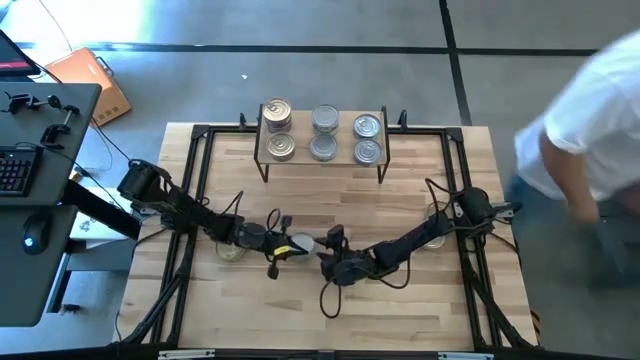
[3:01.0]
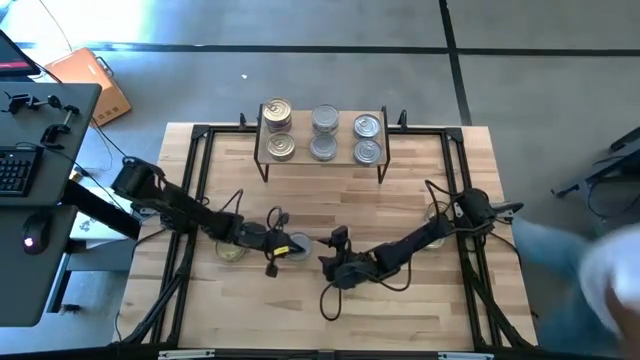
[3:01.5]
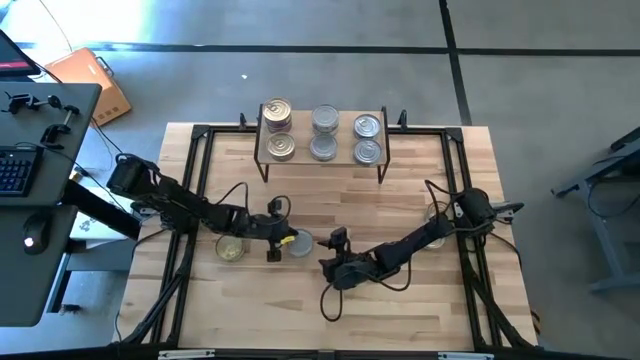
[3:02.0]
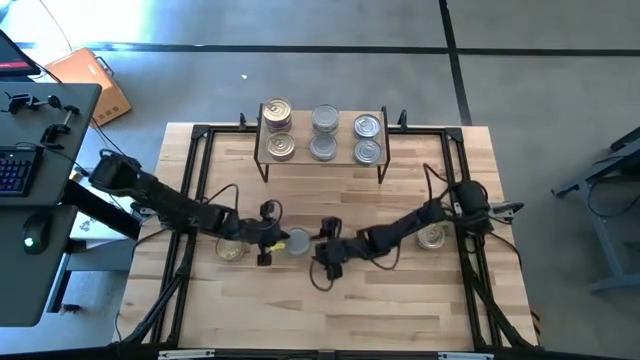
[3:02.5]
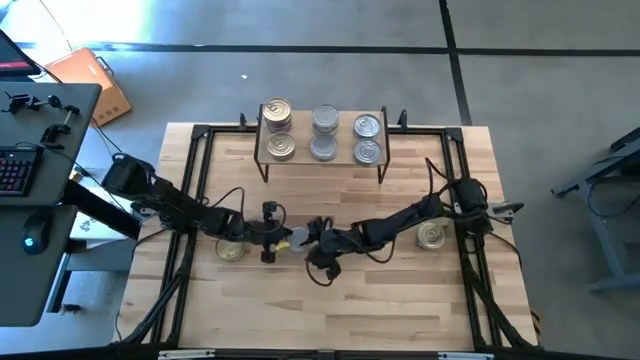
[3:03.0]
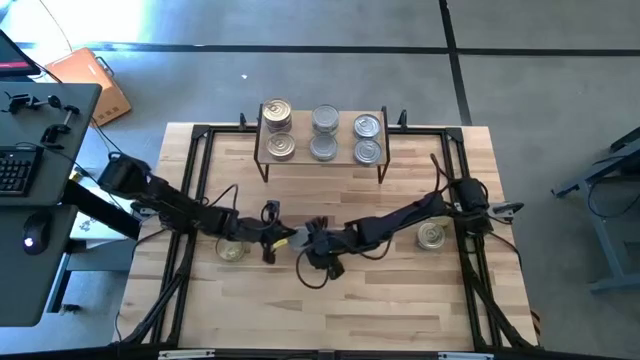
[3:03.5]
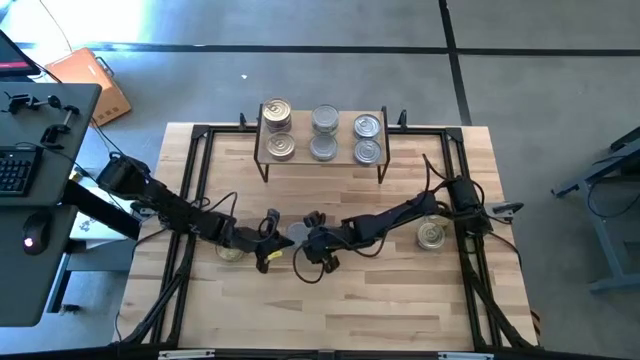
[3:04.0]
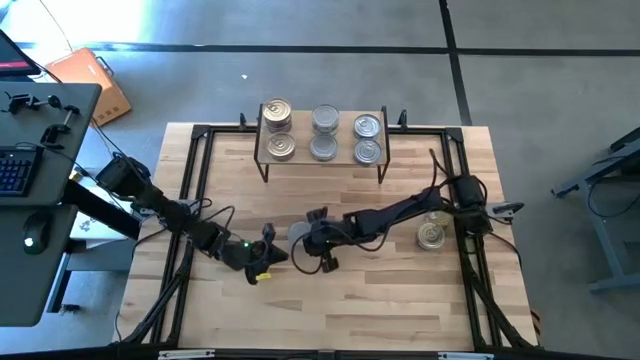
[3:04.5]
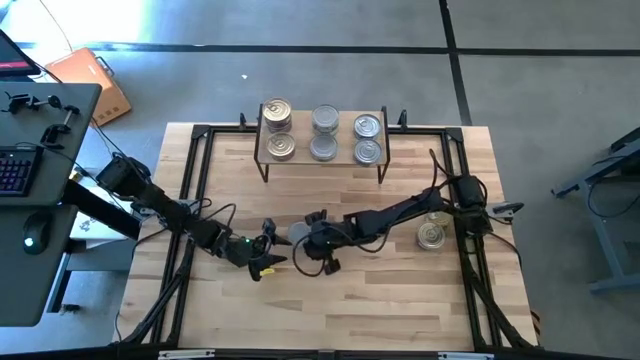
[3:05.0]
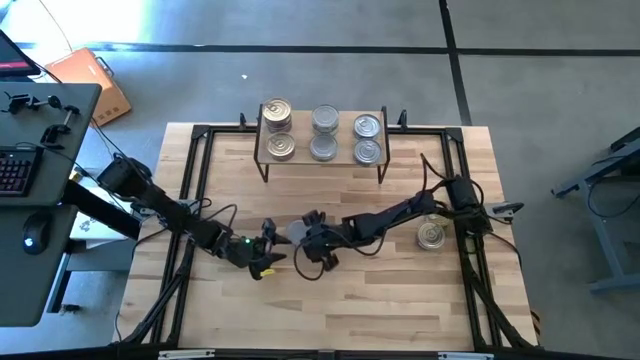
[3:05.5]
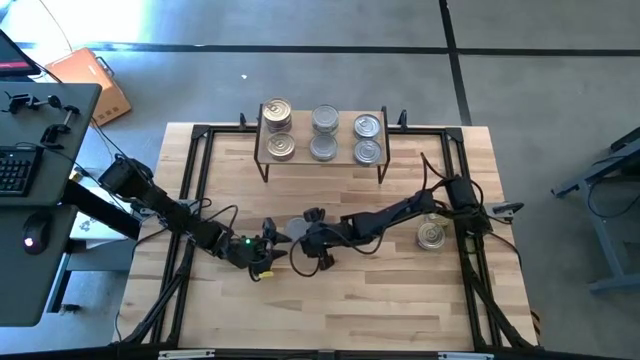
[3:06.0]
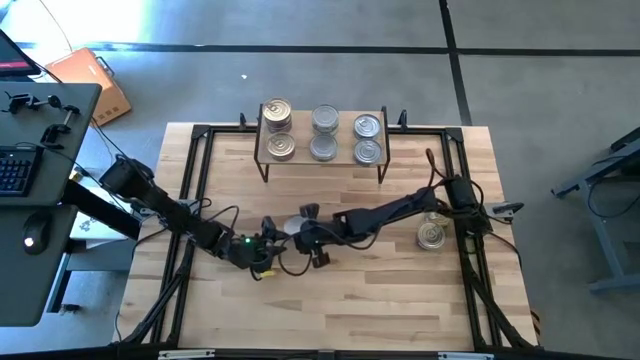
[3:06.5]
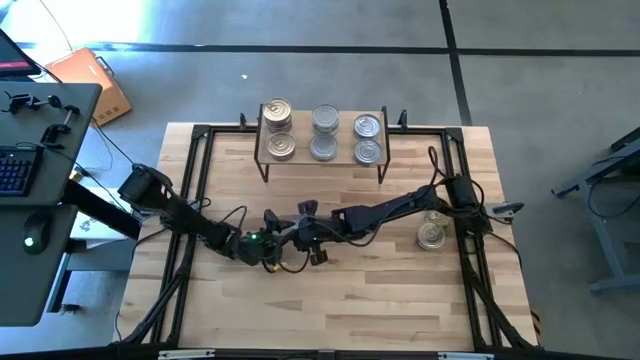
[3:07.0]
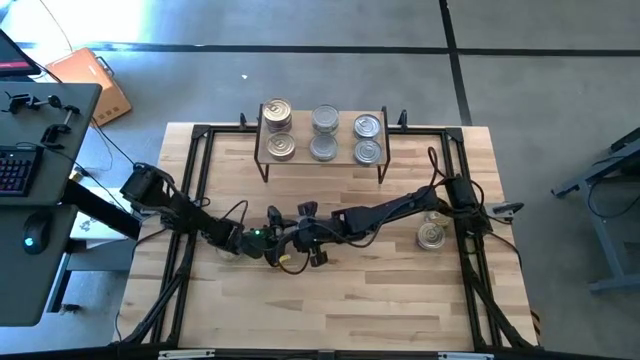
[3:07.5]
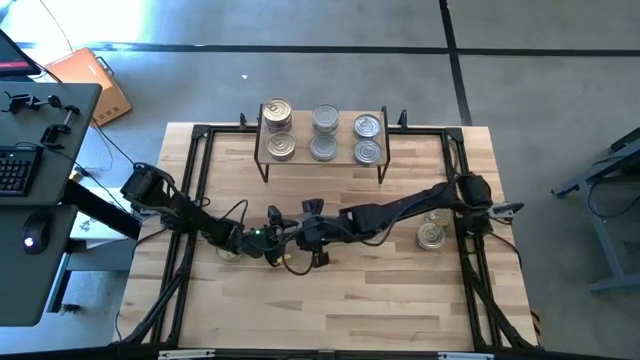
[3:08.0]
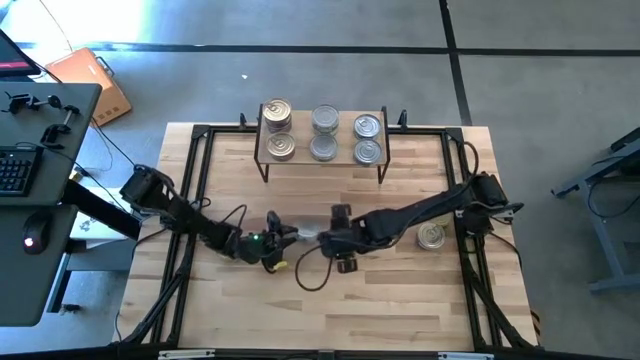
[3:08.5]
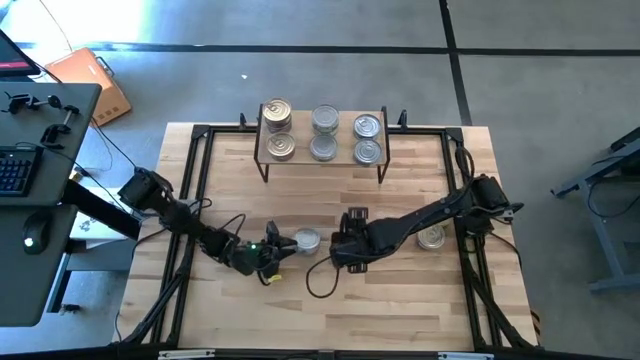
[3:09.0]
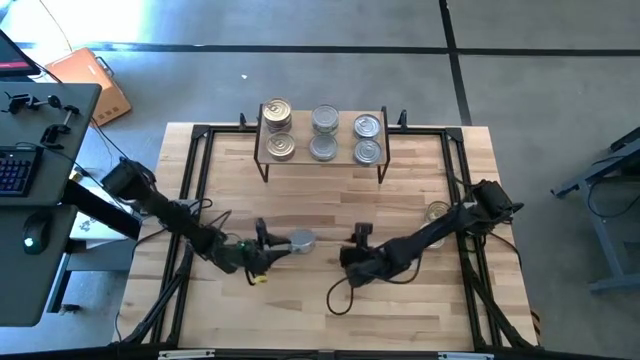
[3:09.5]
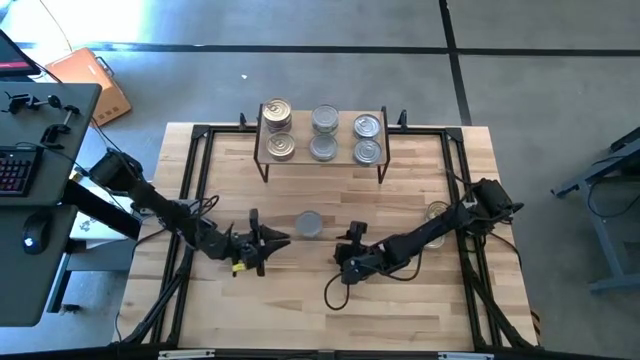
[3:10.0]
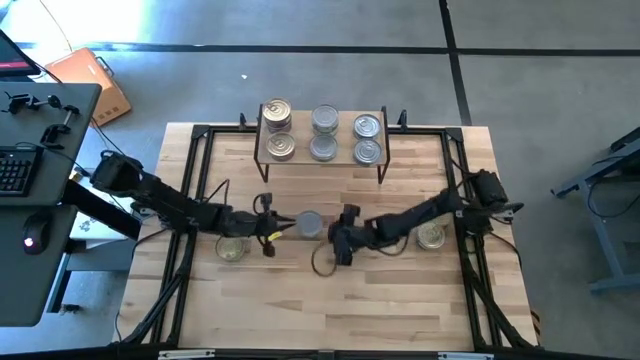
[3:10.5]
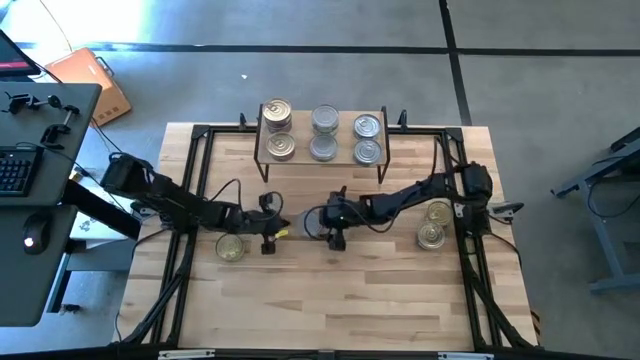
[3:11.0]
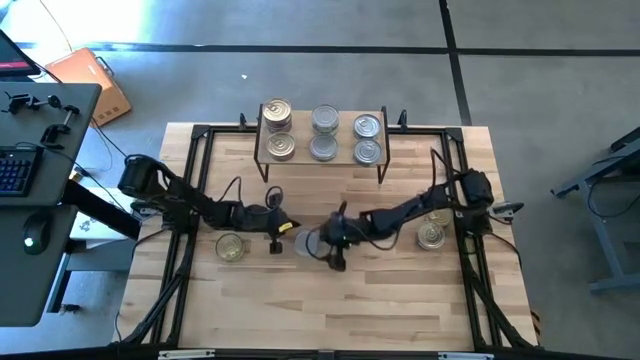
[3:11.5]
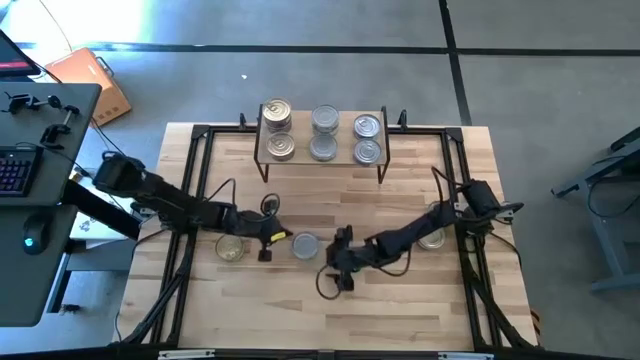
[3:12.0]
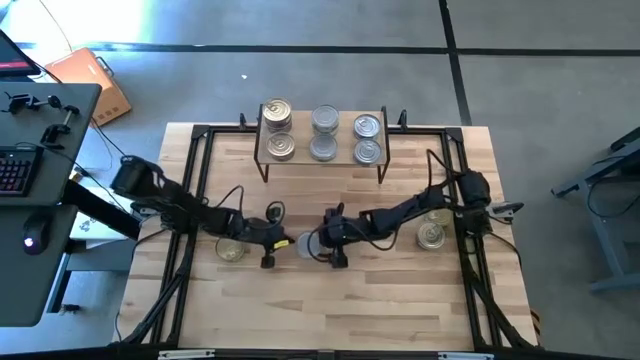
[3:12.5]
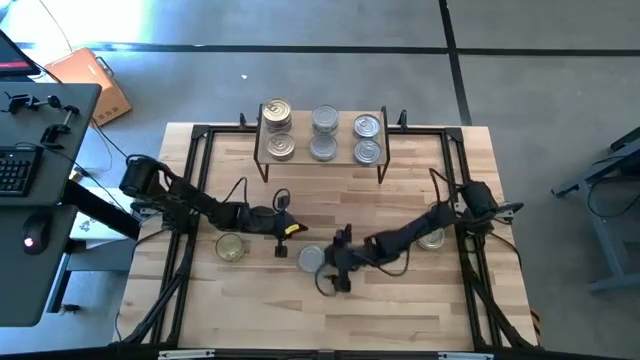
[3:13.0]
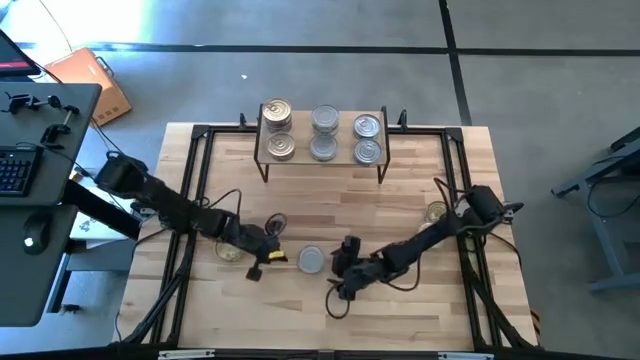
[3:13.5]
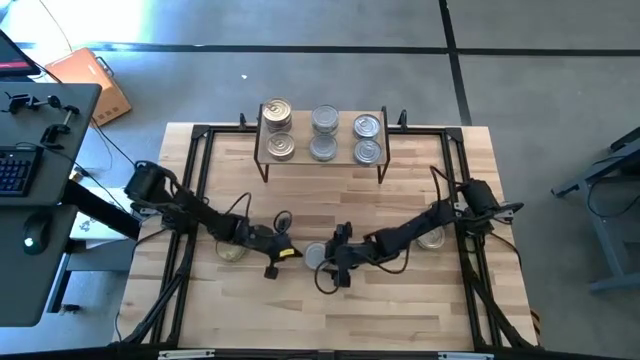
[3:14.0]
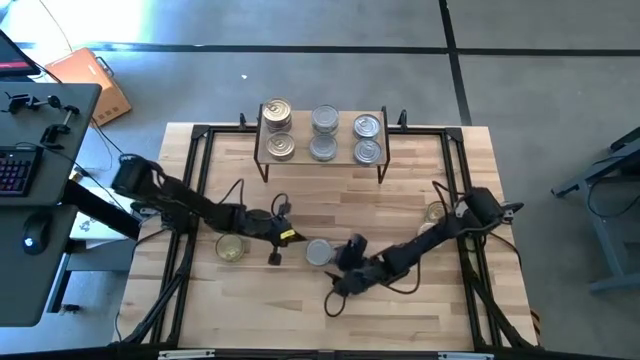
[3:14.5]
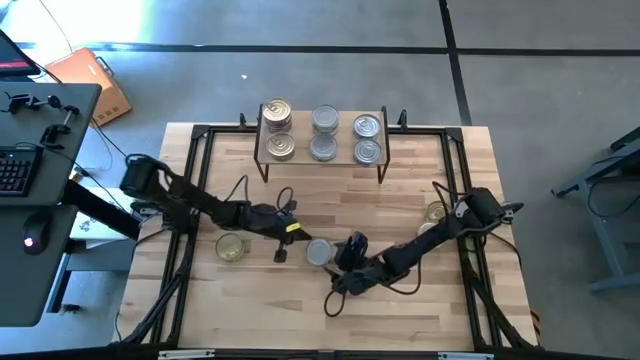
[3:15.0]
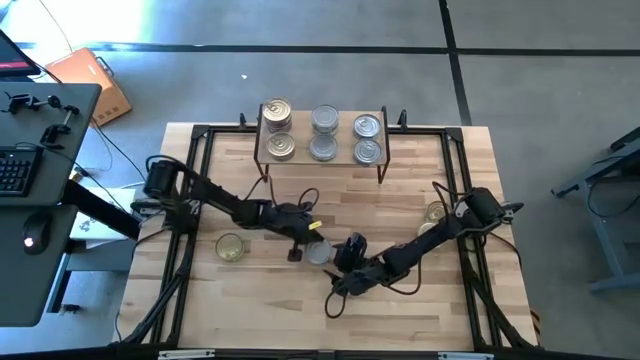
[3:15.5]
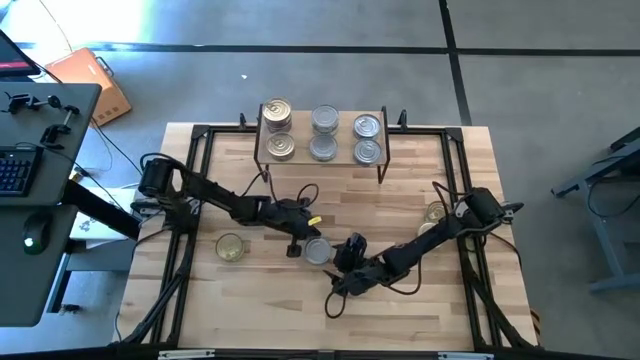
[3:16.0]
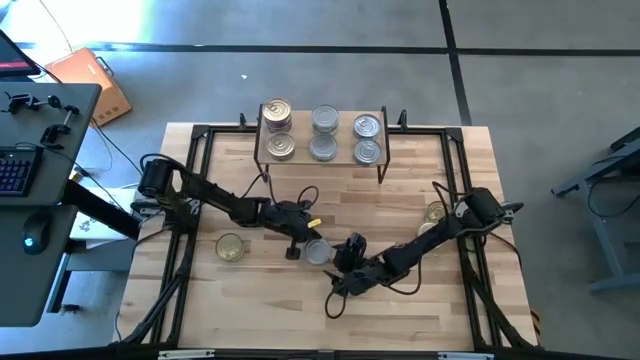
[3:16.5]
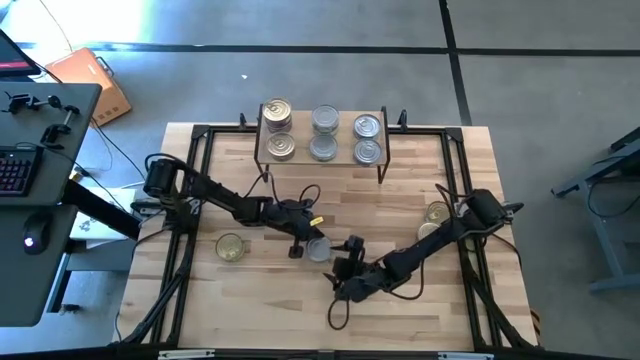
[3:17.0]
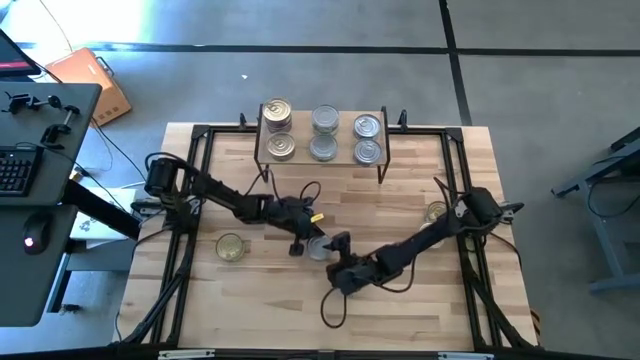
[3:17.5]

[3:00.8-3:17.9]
Task: Stack canned seafood by type on shelf
Stack the green and white tuna can on top of the green and white tuna can on the shelf

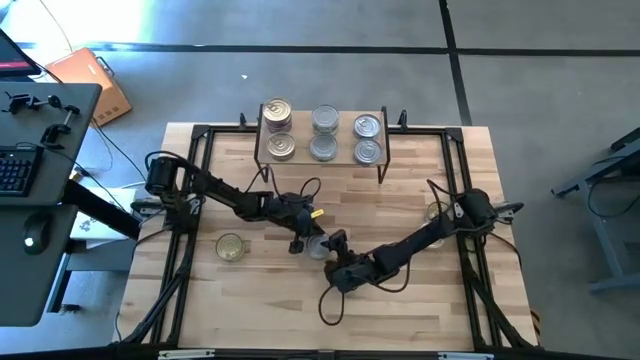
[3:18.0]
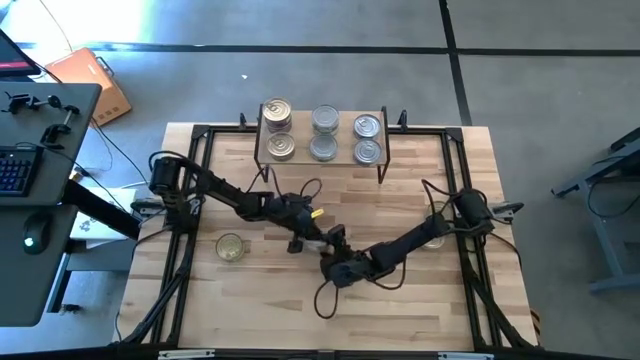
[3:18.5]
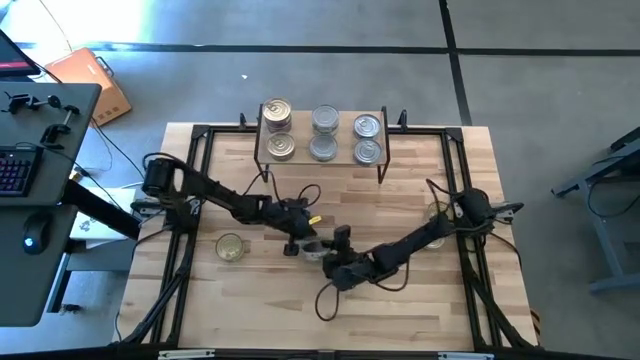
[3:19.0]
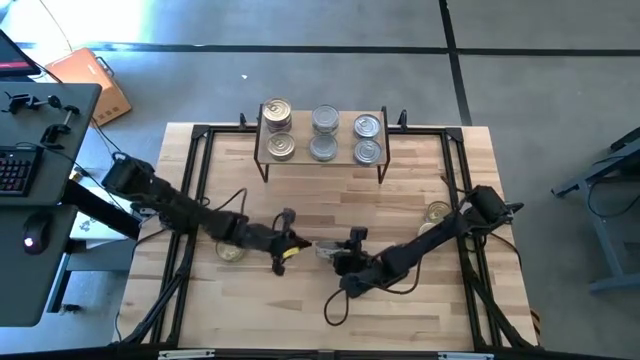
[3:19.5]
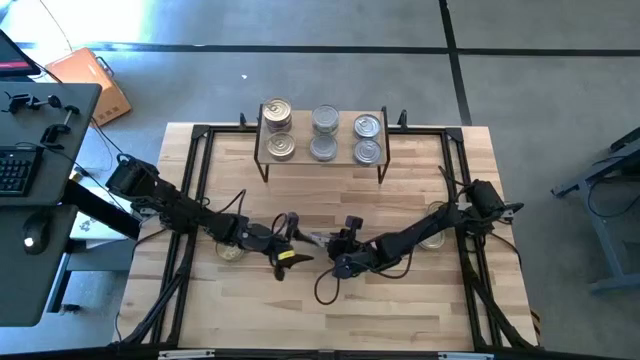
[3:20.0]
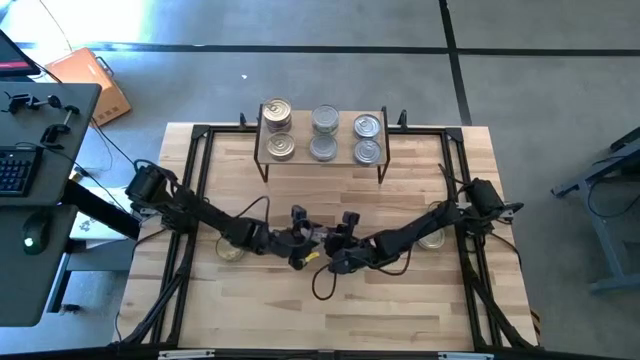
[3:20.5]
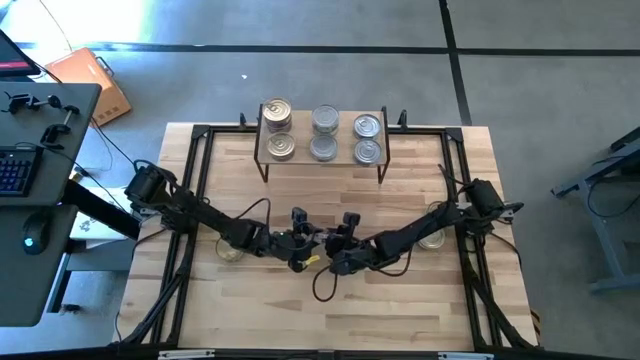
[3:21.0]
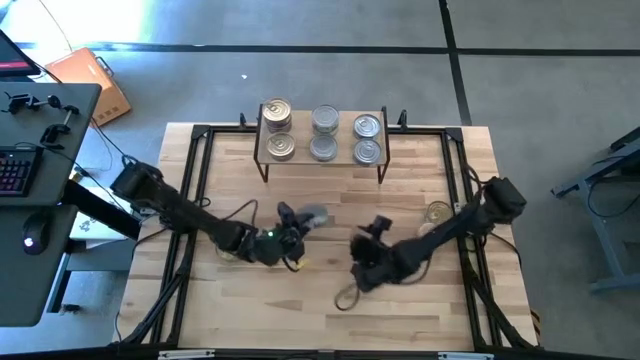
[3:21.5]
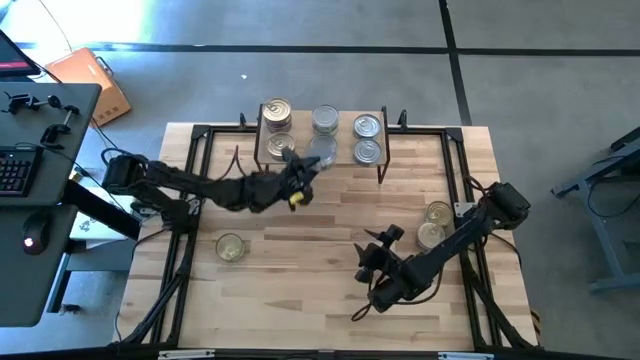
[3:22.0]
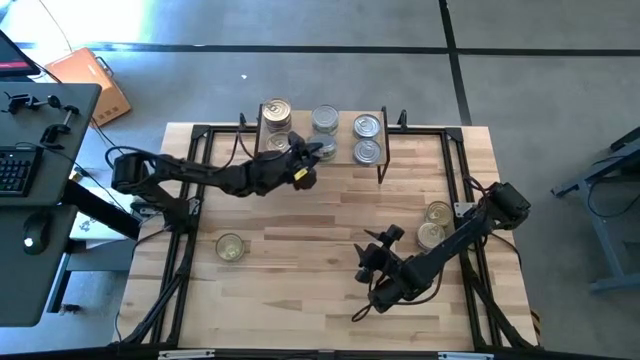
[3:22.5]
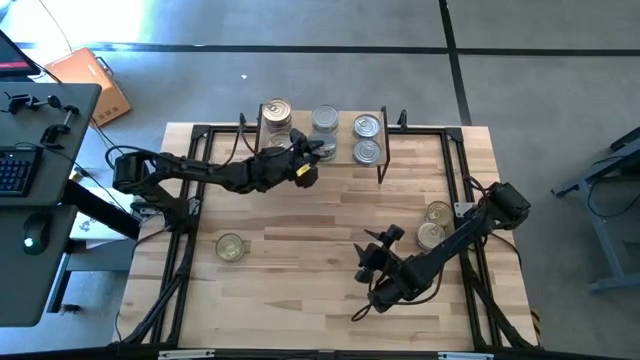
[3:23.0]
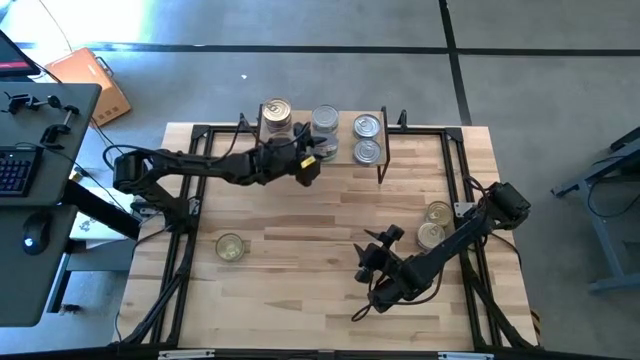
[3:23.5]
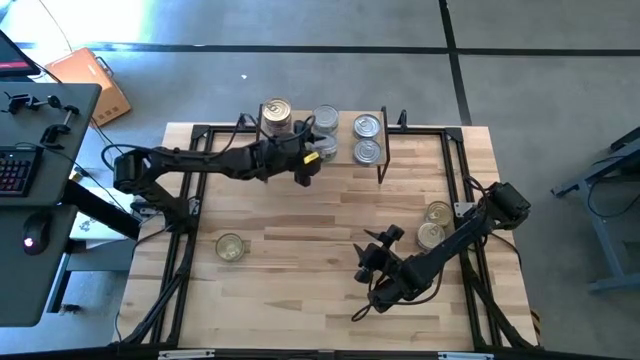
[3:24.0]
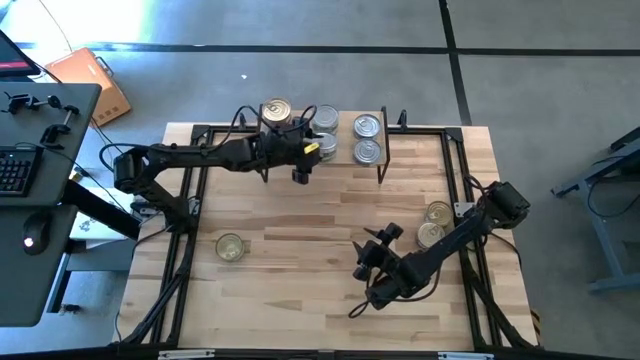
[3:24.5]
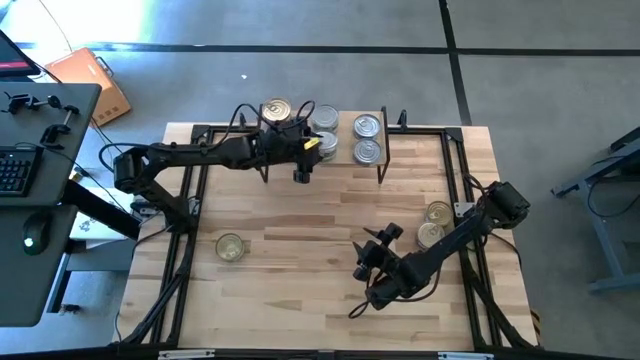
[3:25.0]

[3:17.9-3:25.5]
Stack the green and white tuna can on top of the green and white tuna can on the shelf
